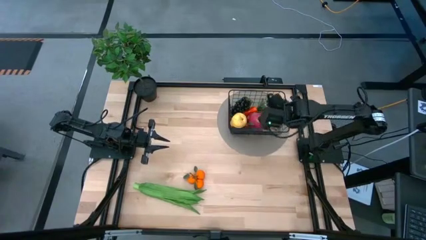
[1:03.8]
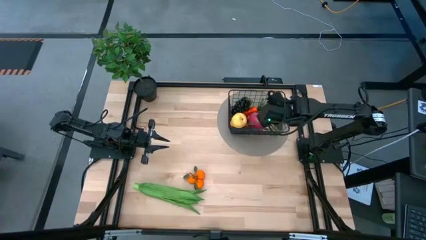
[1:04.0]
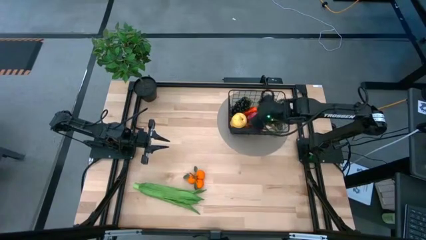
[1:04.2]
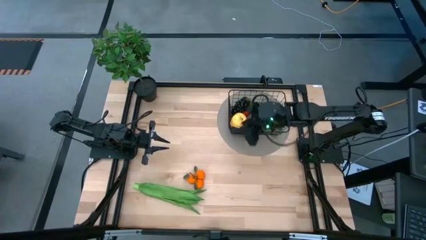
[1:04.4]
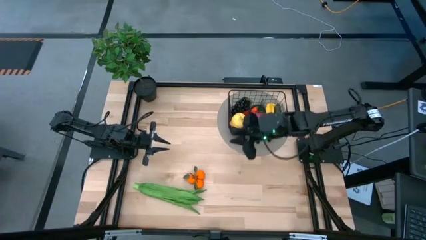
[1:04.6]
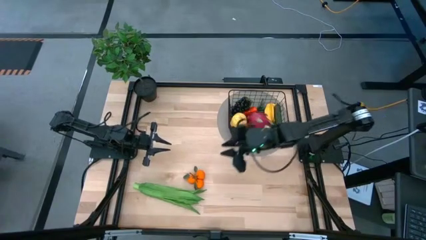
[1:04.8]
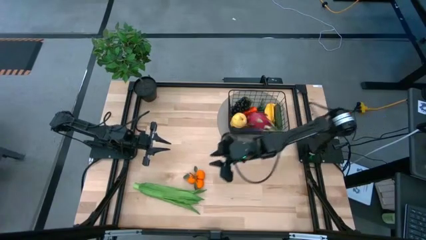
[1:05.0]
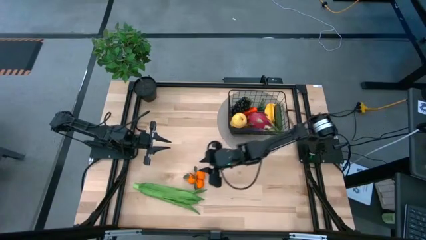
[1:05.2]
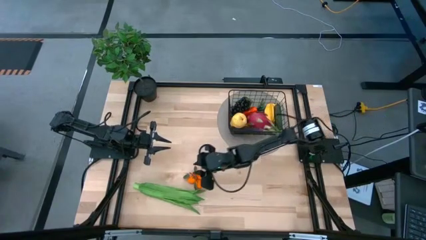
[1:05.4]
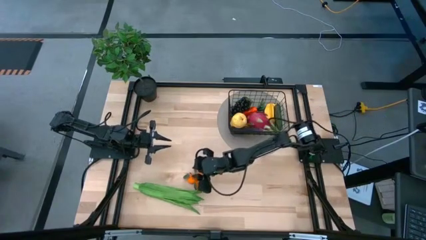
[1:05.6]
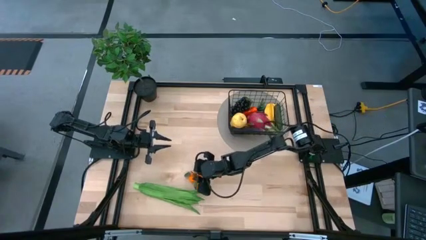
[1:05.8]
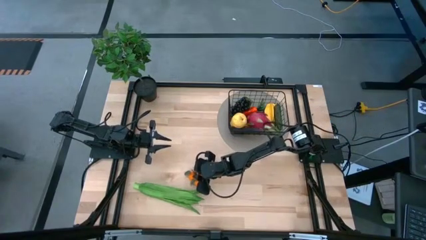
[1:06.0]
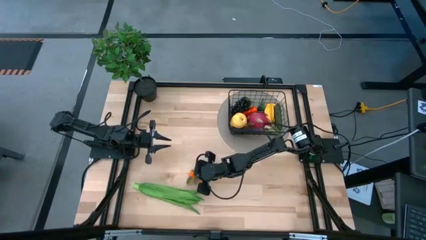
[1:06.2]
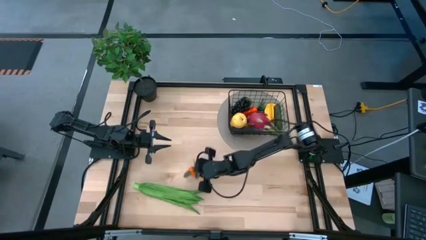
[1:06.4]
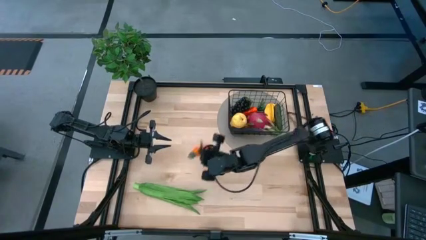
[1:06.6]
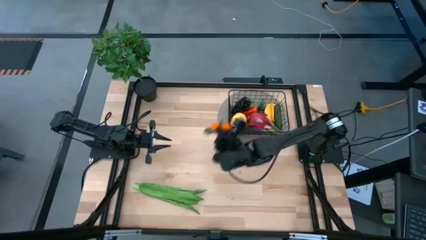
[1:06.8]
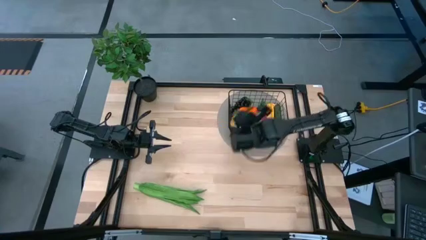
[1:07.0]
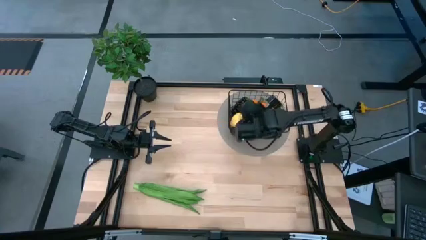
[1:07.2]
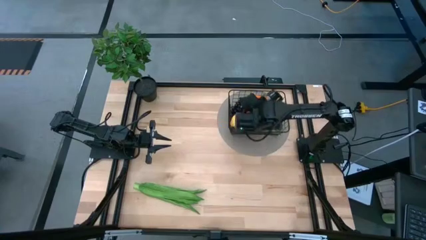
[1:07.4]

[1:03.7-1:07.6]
Task: Build produce basket
Put the tangerines into the wire basket

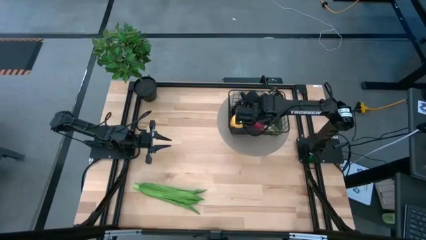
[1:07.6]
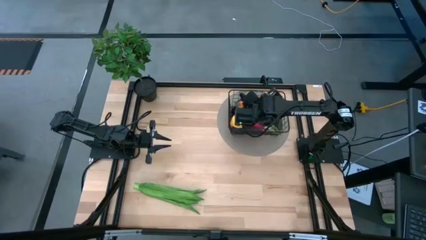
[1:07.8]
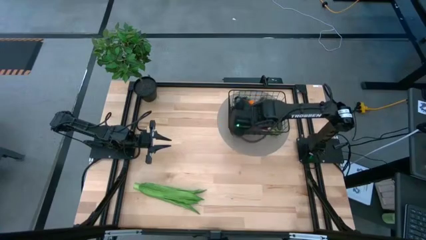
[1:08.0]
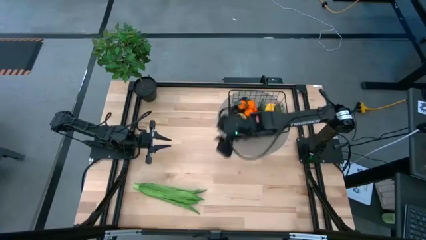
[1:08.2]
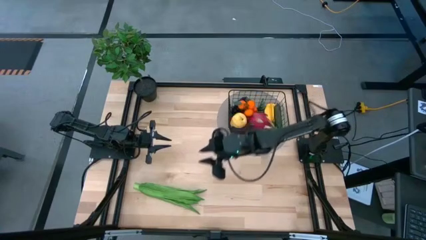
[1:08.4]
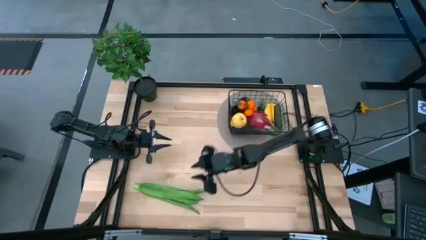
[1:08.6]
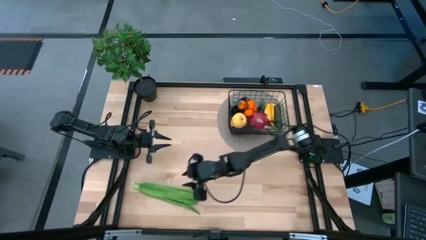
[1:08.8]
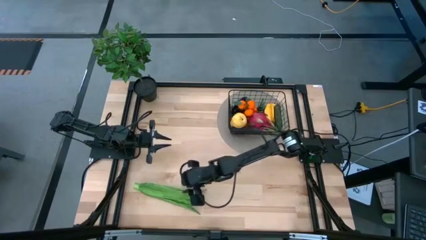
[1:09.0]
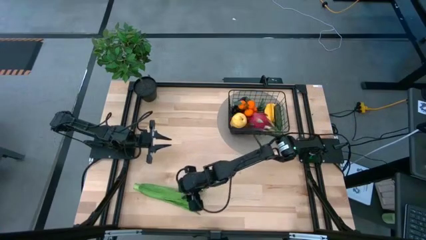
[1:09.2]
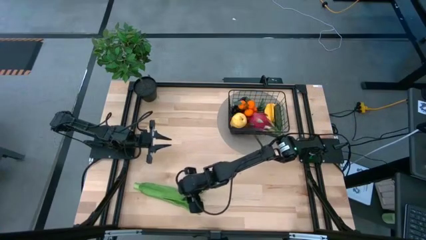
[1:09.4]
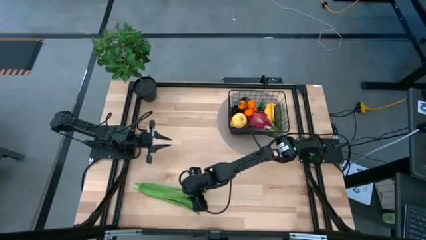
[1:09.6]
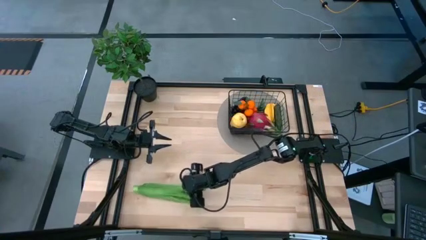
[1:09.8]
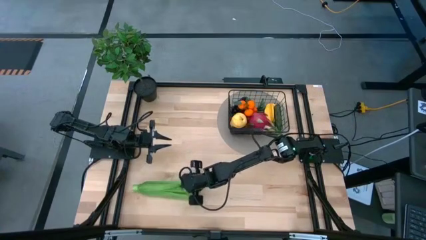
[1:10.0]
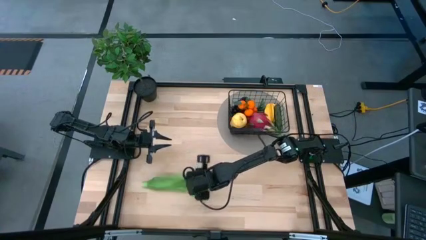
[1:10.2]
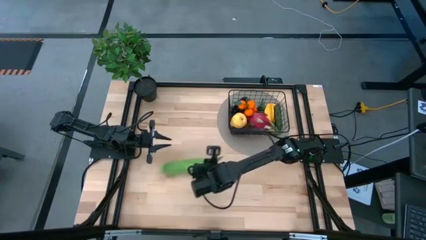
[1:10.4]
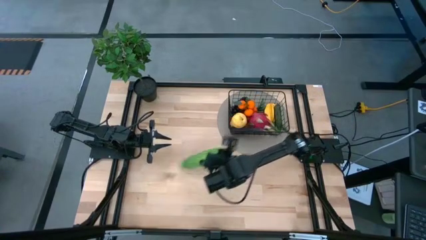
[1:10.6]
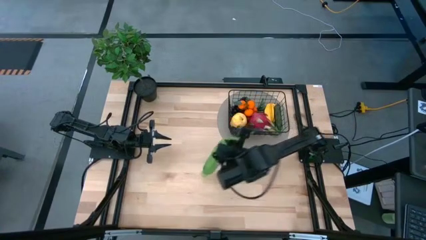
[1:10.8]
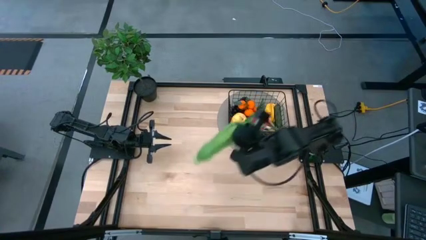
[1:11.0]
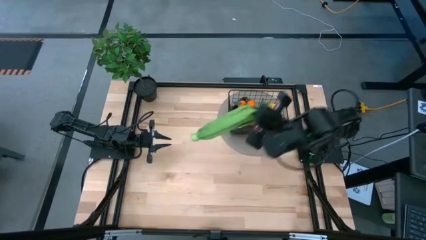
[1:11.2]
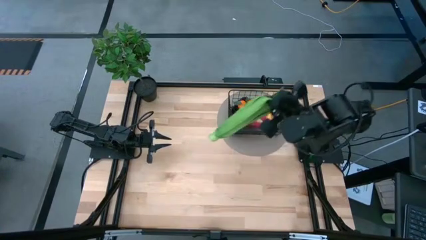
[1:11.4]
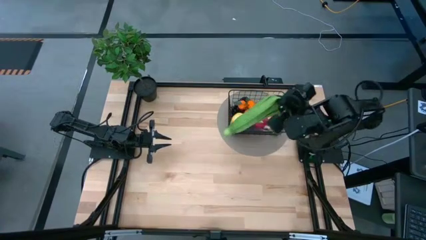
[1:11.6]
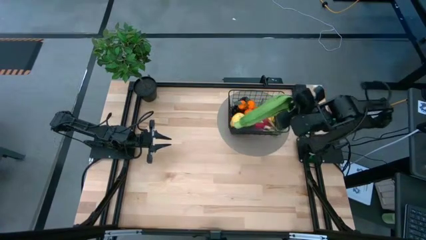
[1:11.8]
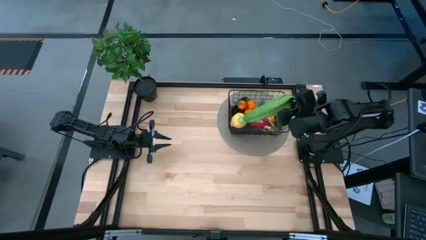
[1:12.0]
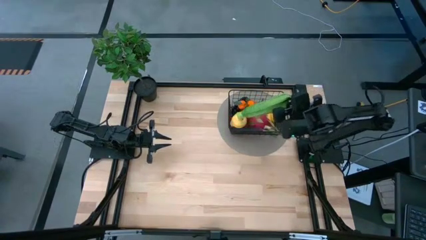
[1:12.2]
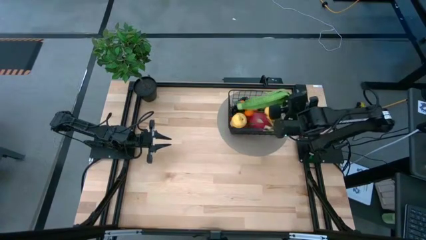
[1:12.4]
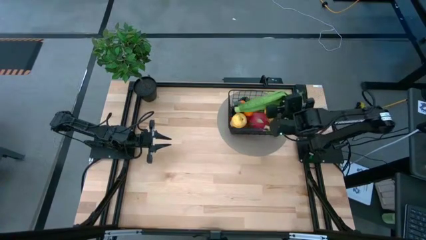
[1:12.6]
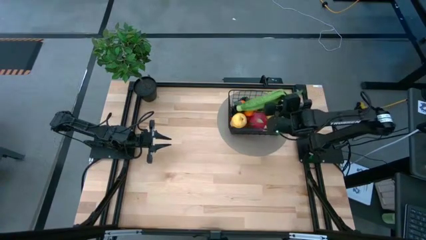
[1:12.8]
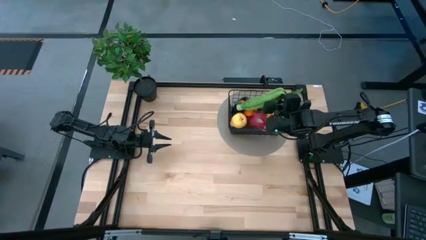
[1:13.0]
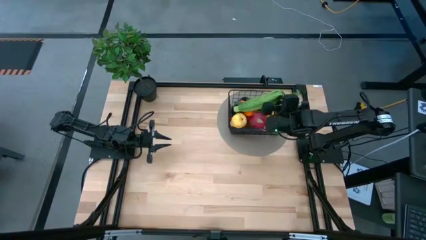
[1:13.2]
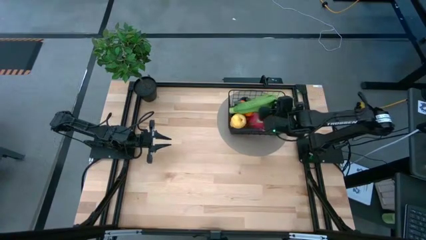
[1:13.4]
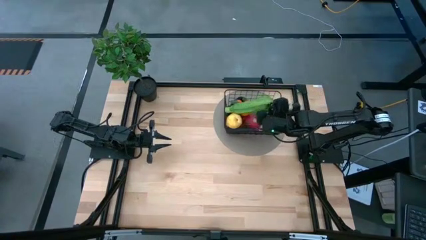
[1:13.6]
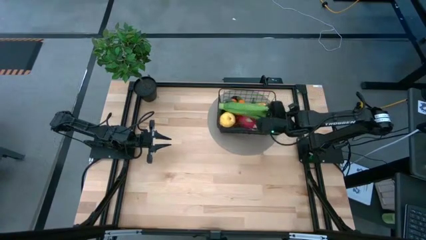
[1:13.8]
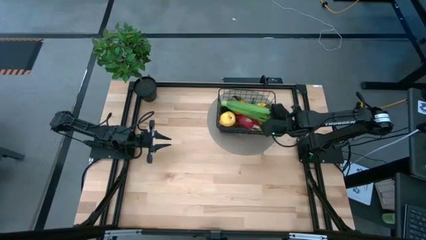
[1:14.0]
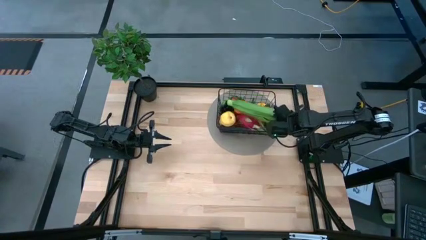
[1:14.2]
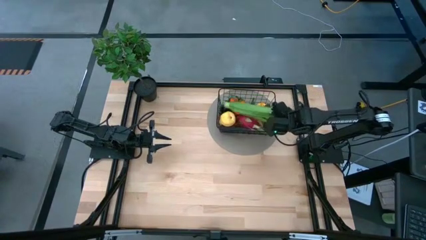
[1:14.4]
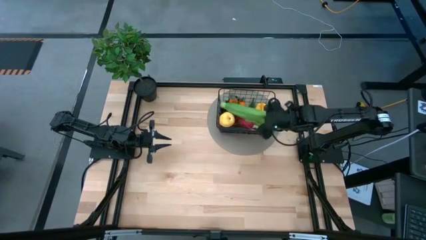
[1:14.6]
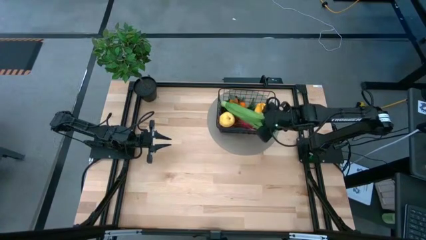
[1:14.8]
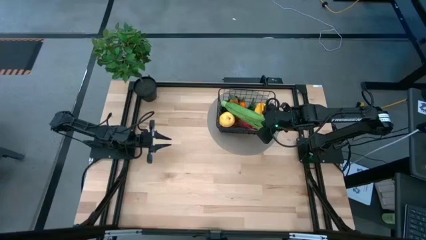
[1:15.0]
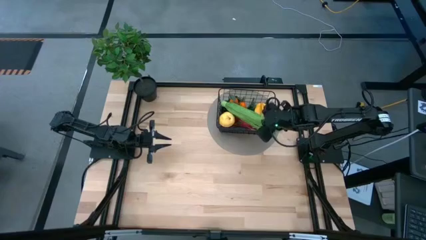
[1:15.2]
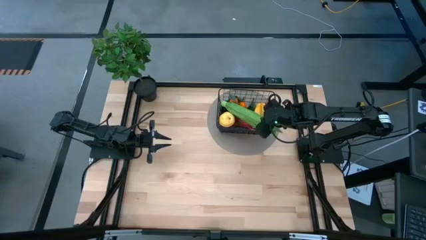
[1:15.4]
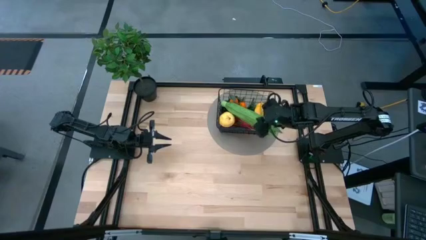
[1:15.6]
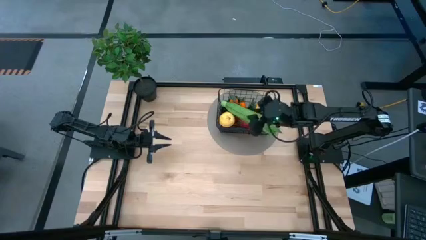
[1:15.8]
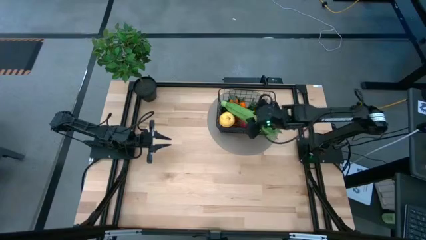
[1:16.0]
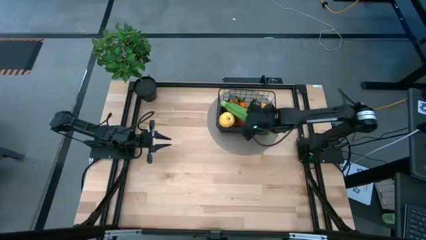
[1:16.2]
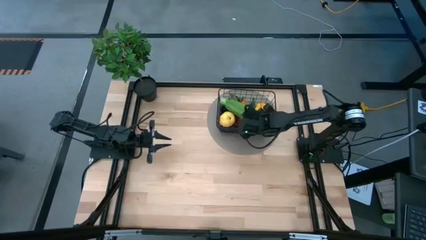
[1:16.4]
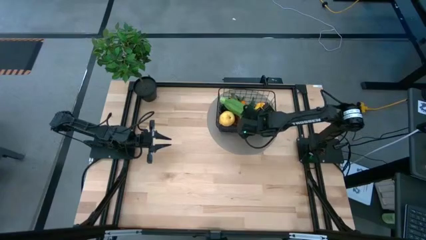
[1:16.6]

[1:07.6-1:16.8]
Put the leaf lettuce into the wire basket
